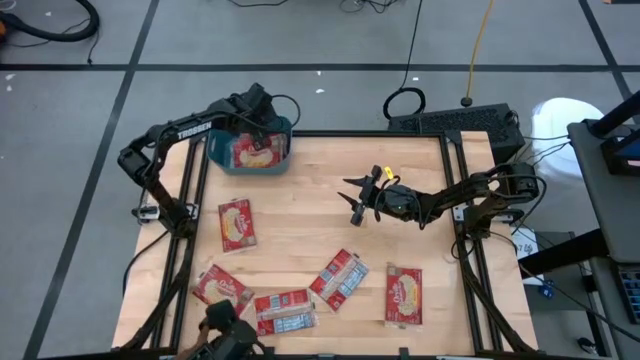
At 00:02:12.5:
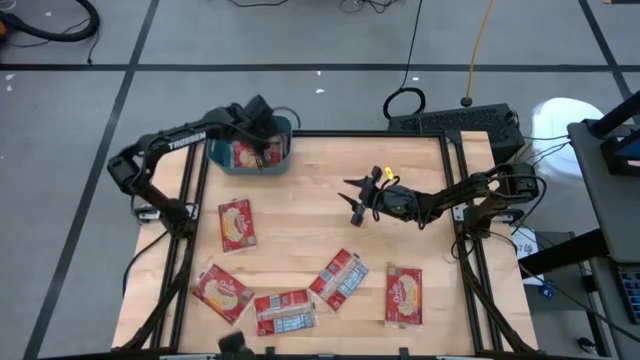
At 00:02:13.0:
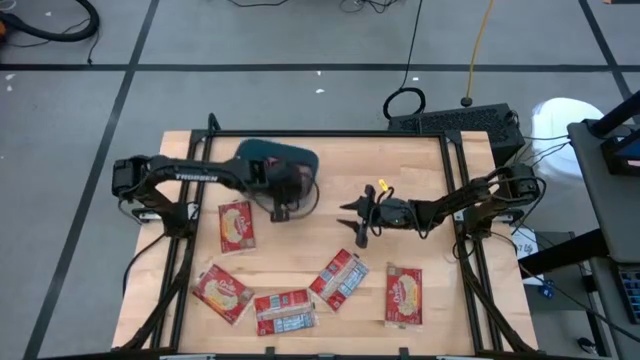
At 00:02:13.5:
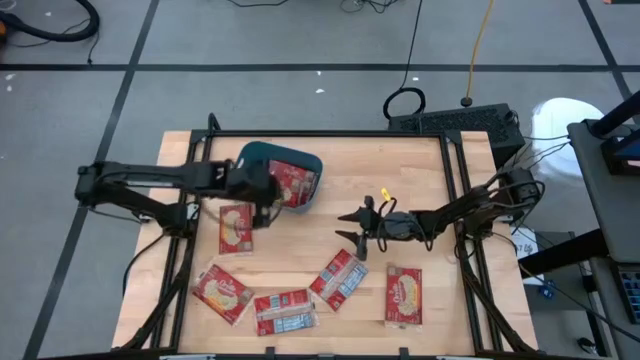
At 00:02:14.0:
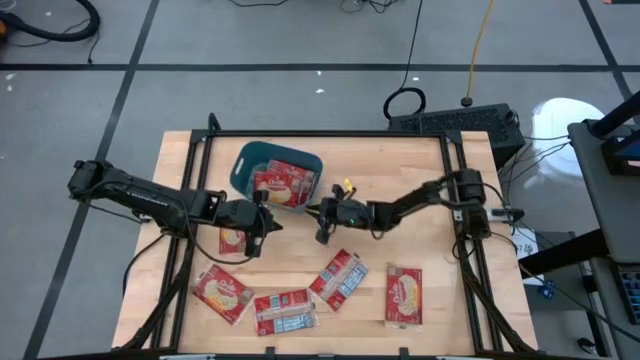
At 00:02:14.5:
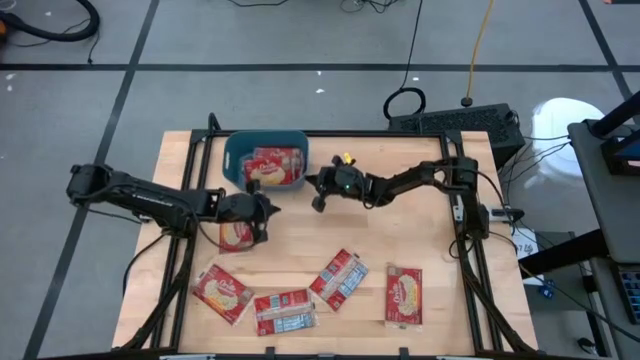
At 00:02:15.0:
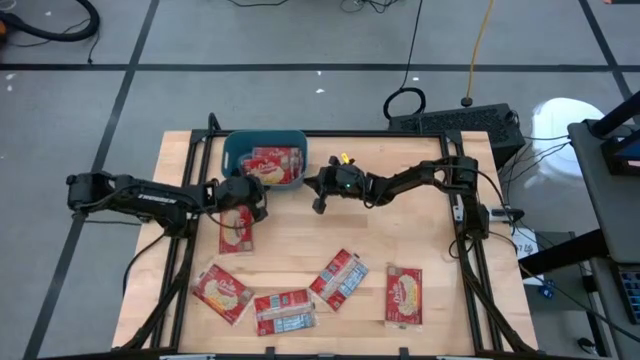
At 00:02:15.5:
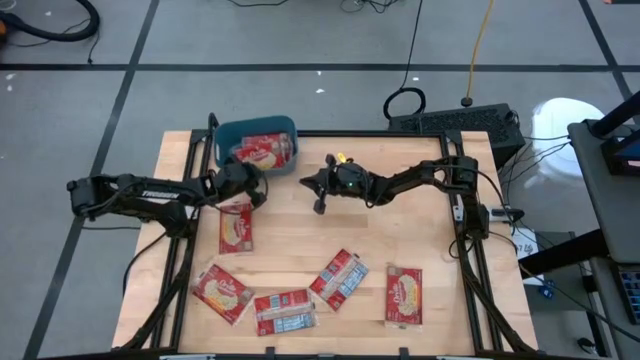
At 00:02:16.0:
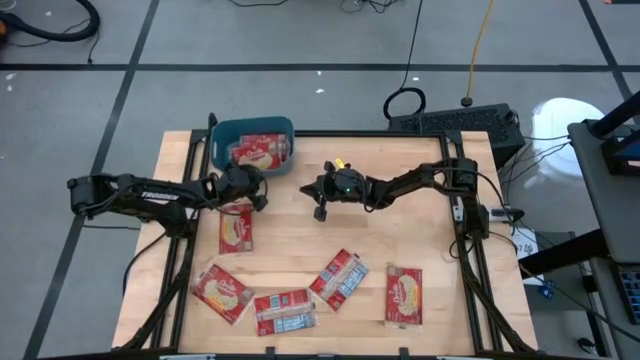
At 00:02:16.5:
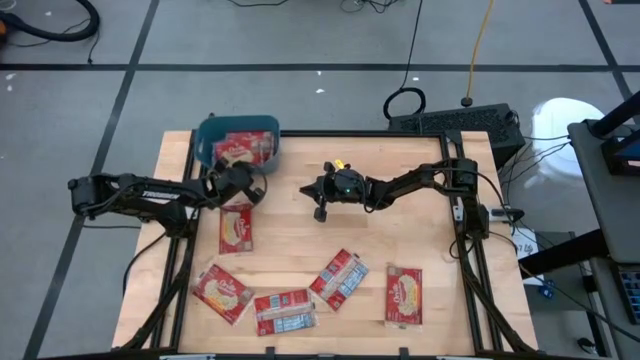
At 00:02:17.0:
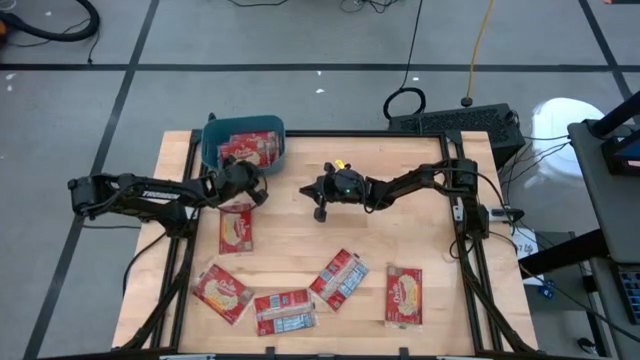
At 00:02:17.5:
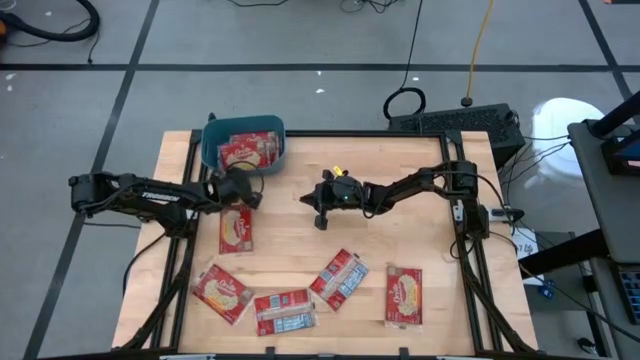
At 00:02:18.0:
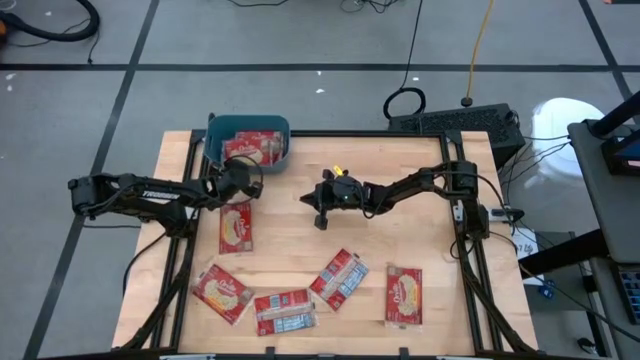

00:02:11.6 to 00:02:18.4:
Task: Sort popcorn bags into baskets
Adjust the blue bin

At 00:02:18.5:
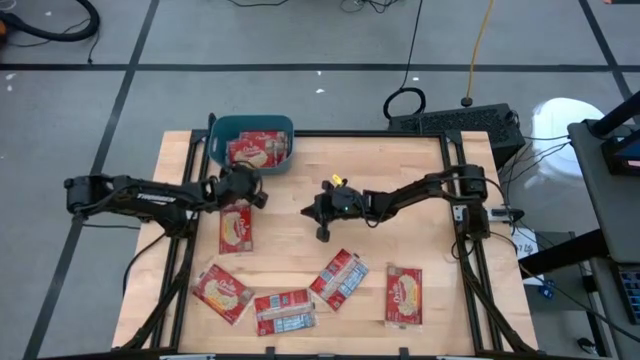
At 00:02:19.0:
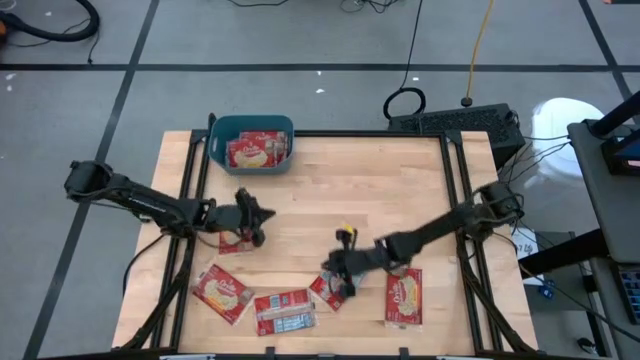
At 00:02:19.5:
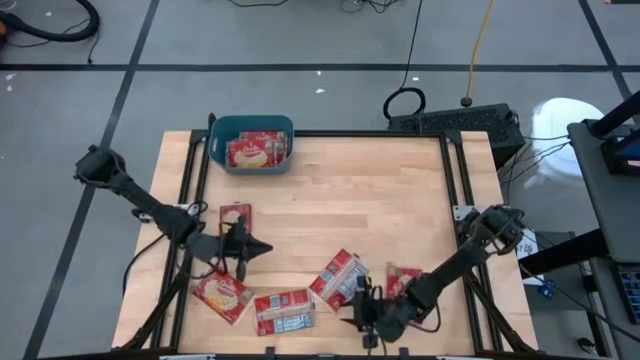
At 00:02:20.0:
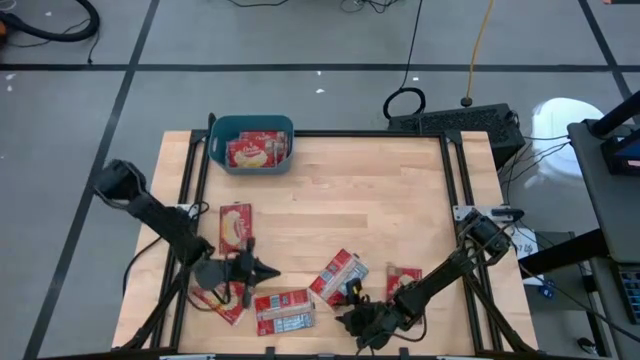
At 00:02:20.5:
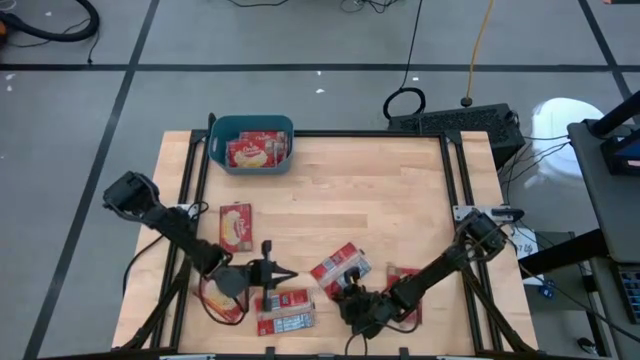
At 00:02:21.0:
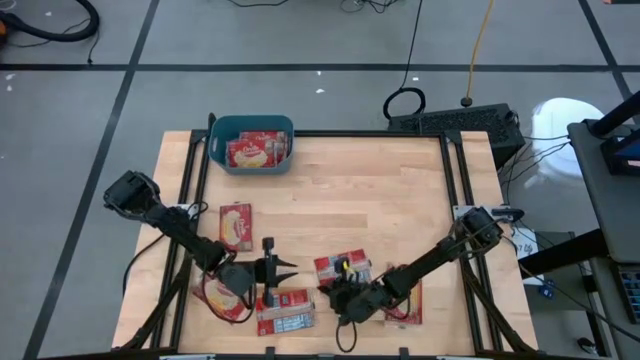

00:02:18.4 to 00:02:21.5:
Put the red popcorn bag into the blue bin

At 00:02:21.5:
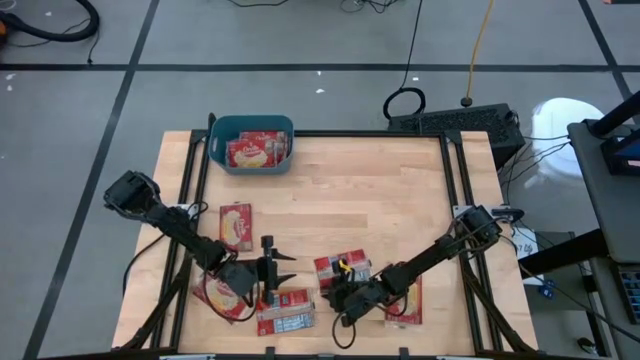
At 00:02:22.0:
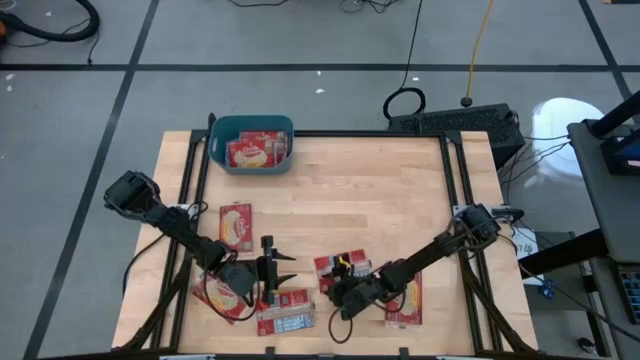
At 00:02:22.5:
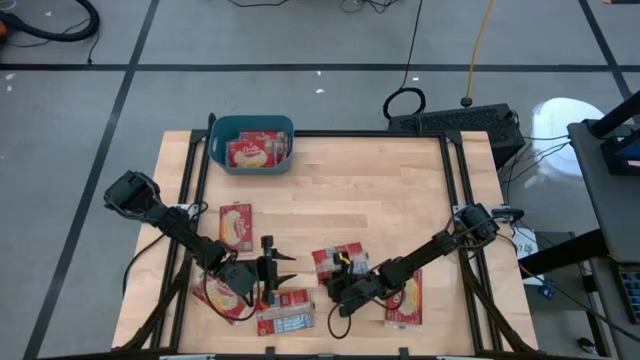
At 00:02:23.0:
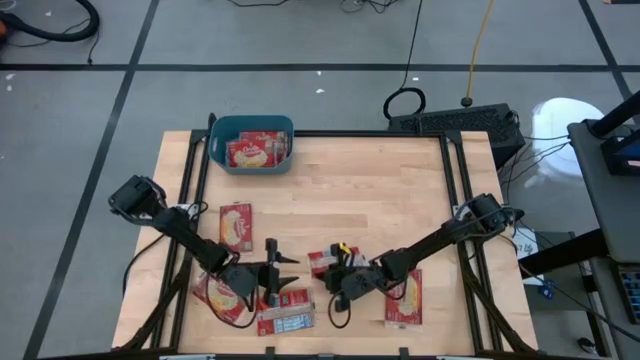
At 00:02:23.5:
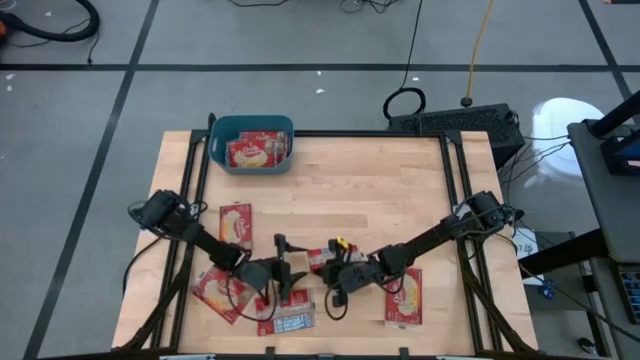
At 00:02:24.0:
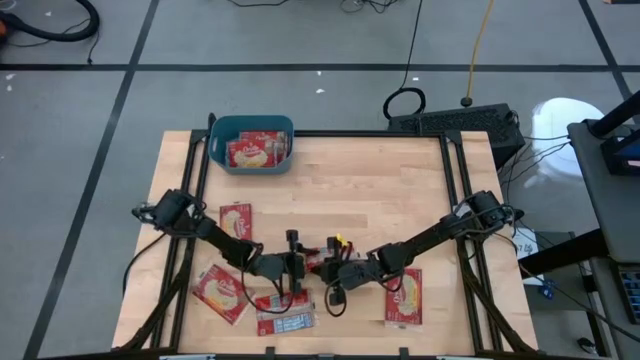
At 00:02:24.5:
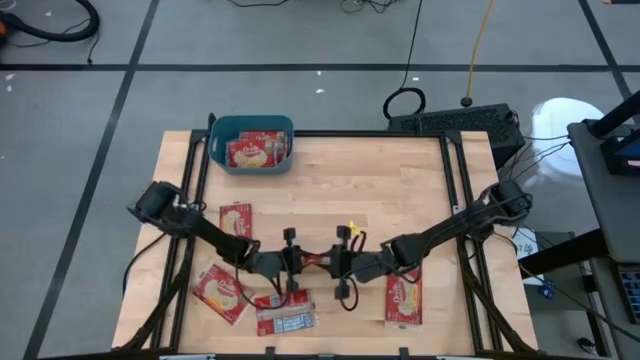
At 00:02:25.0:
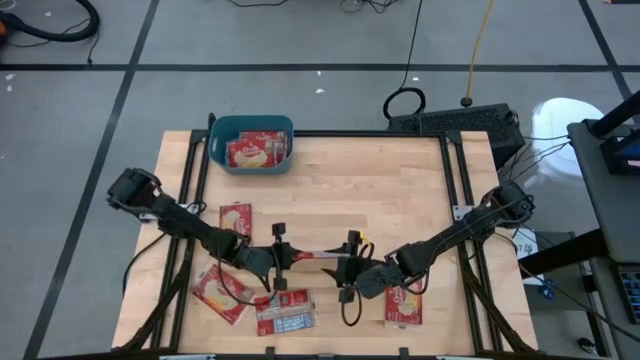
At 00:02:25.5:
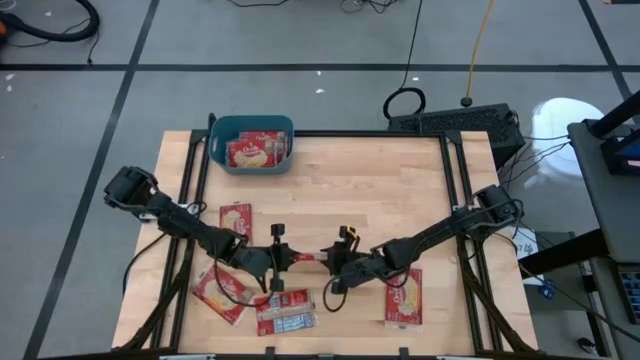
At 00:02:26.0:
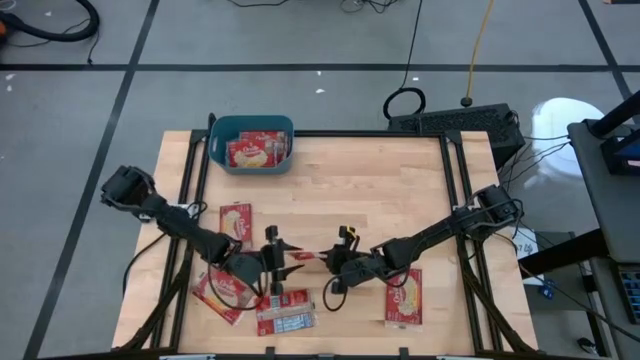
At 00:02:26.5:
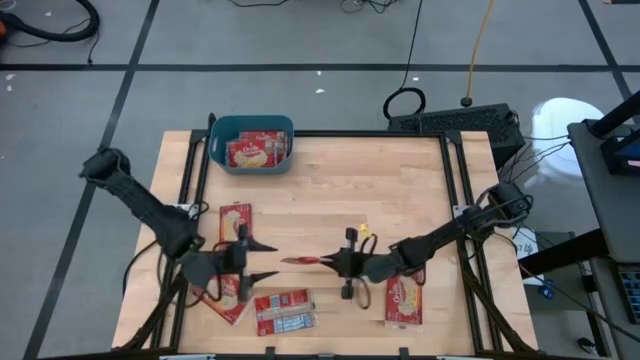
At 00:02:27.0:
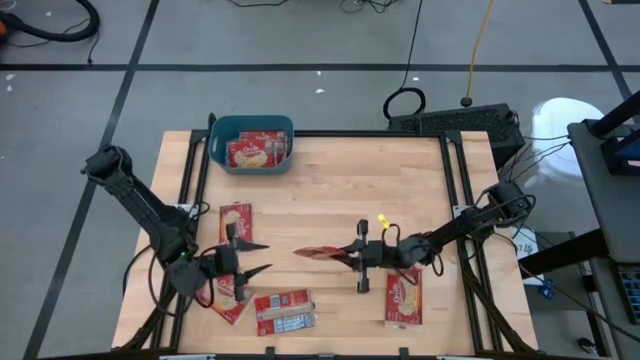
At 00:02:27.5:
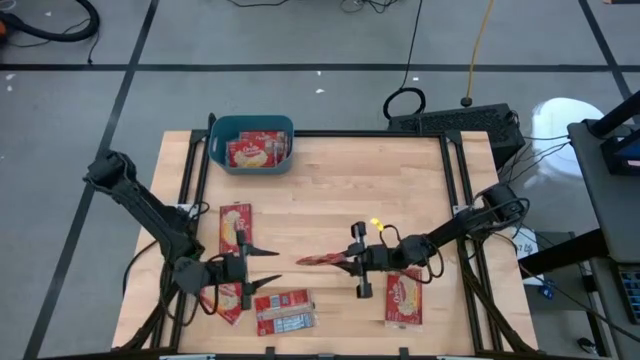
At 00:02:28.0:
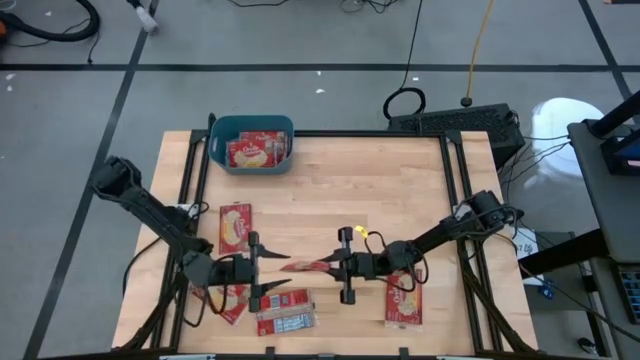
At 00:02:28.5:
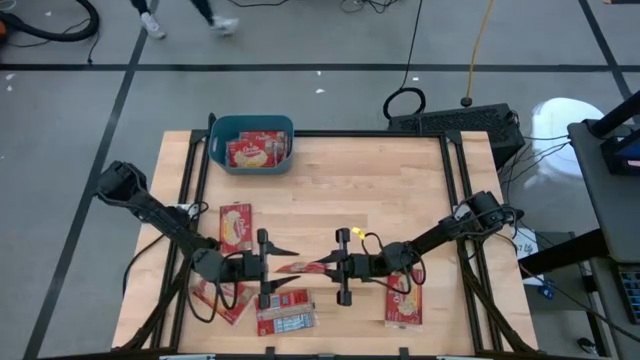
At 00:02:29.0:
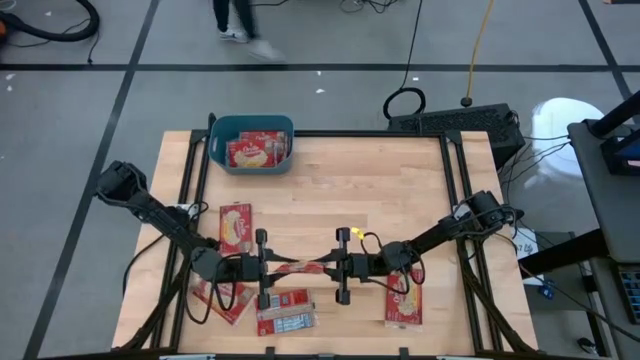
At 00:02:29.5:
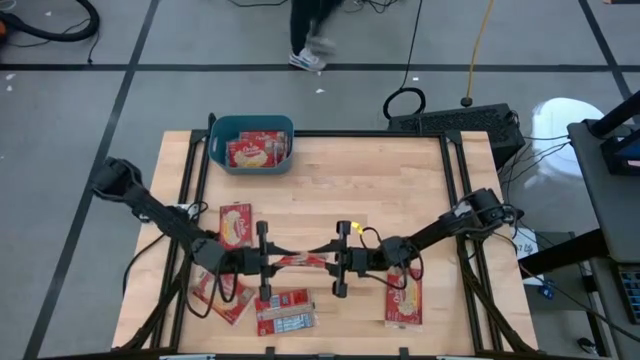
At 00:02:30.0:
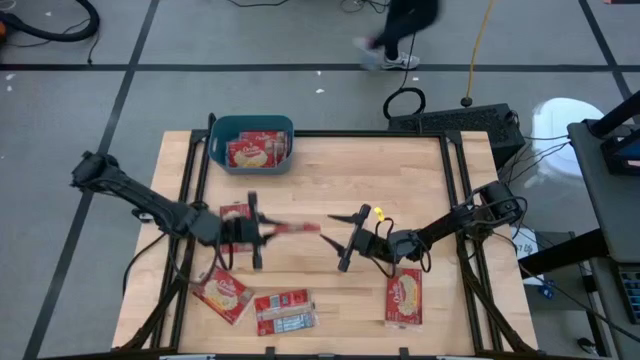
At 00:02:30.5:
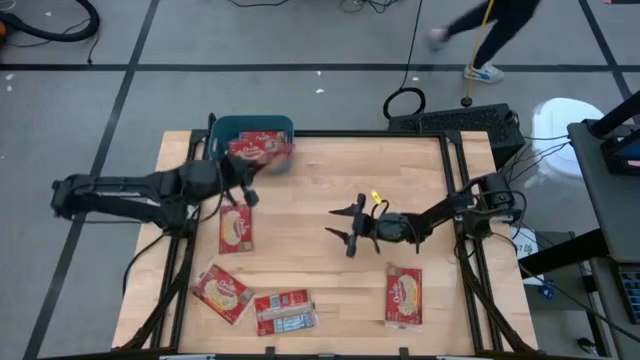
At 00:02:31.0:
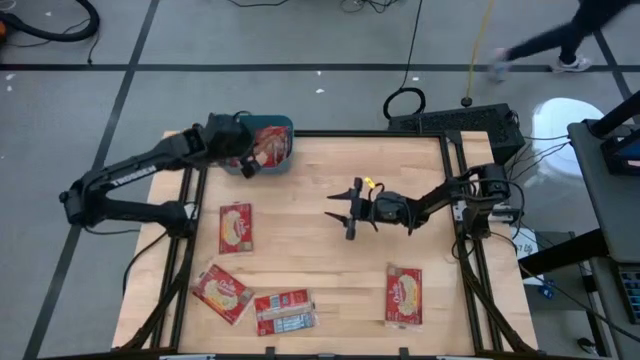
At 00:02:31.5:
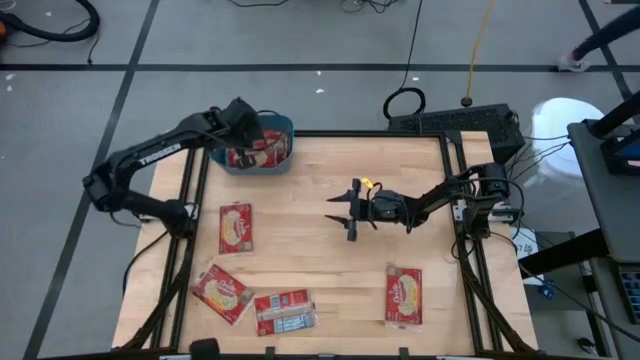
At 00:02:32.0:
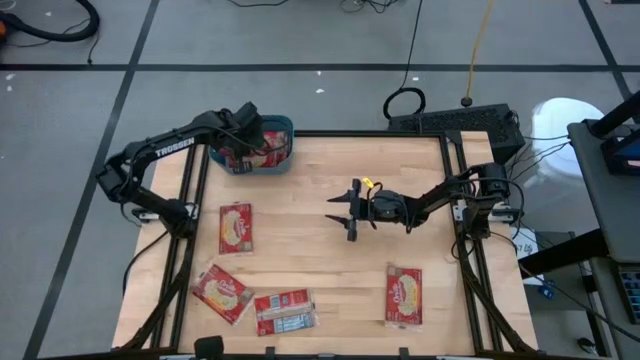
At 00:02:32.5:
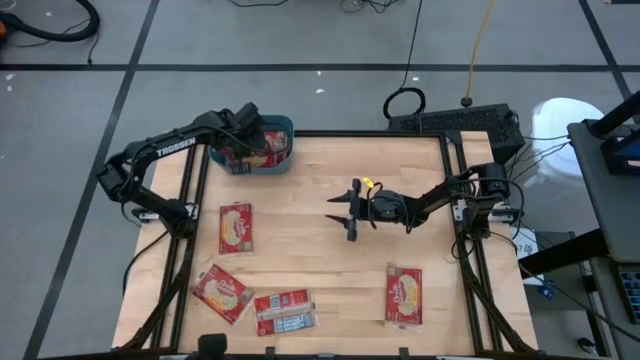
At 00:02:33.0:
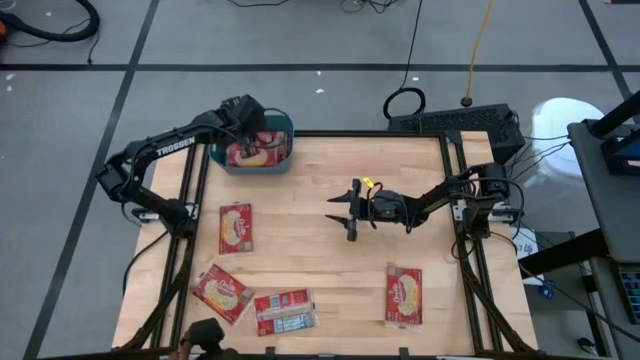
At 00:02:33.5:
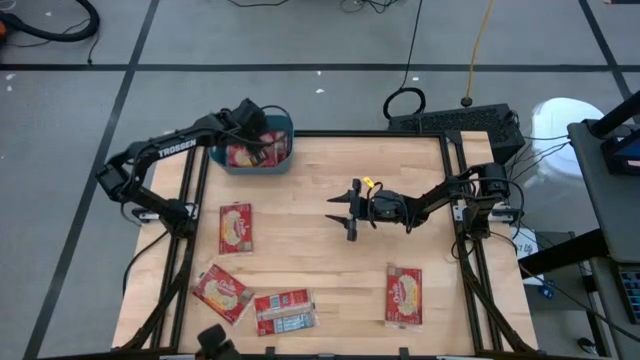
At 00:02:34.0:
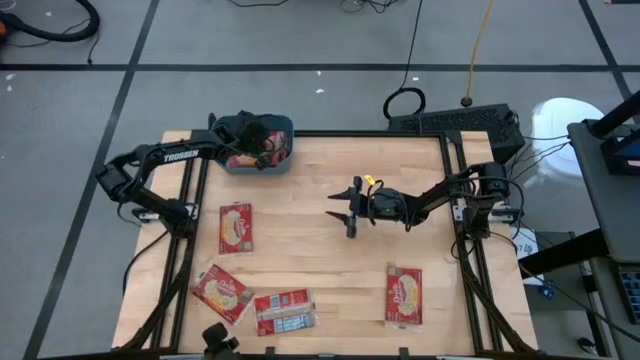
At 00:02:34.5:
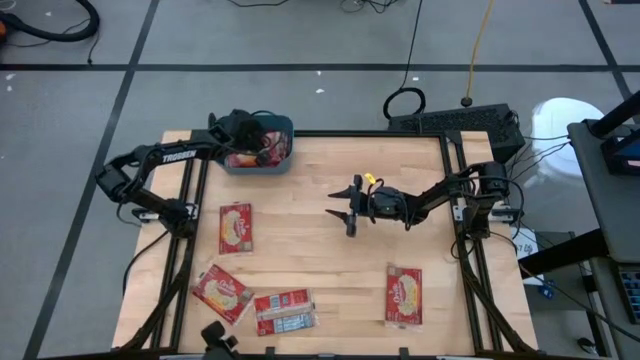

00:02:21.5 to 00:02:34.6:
Put the red popcorn bag into the blue bin
